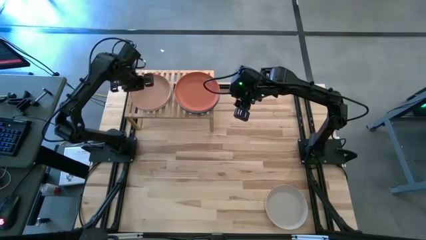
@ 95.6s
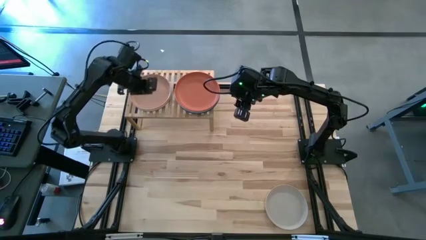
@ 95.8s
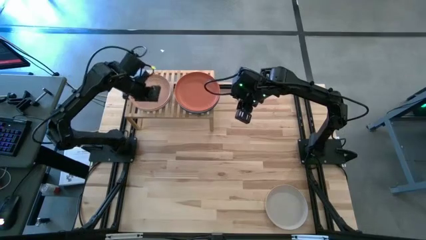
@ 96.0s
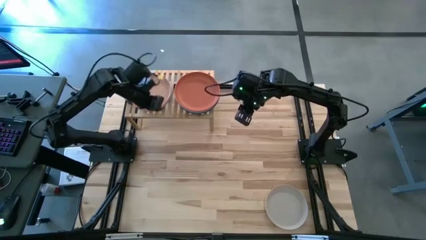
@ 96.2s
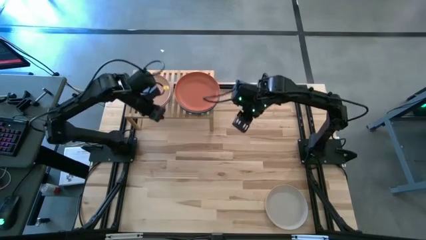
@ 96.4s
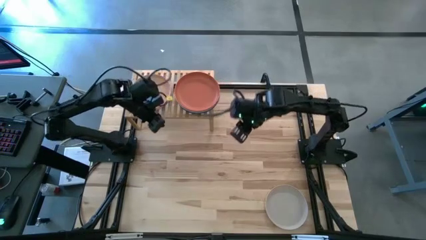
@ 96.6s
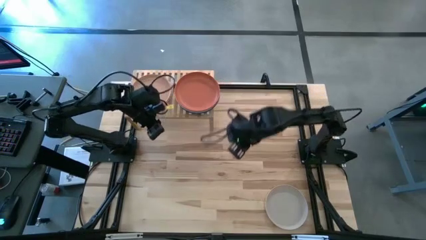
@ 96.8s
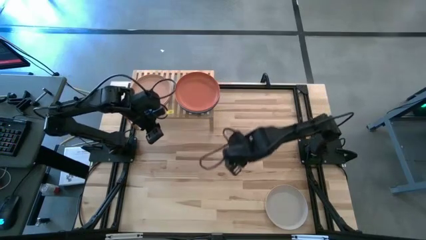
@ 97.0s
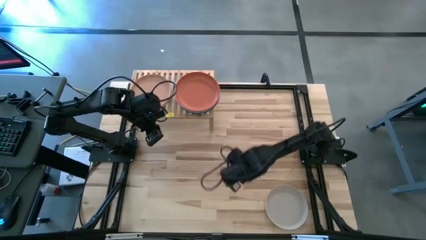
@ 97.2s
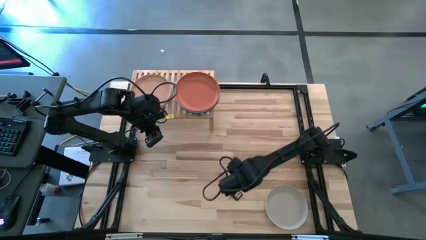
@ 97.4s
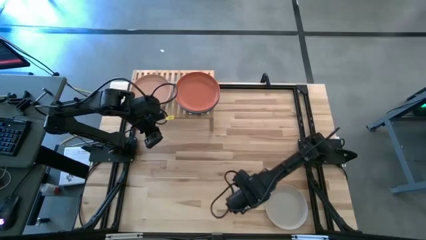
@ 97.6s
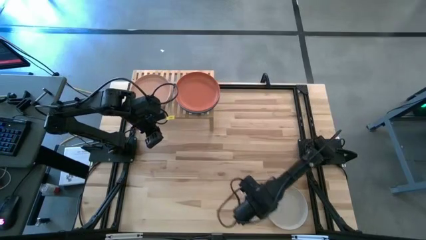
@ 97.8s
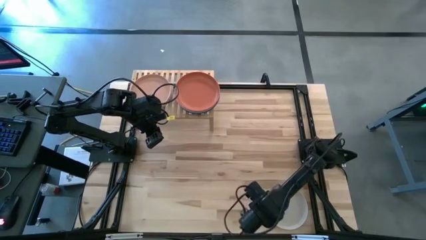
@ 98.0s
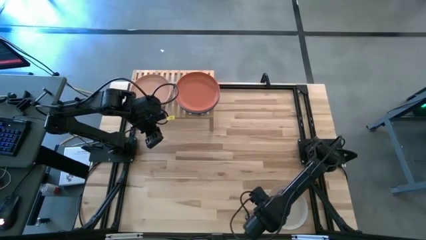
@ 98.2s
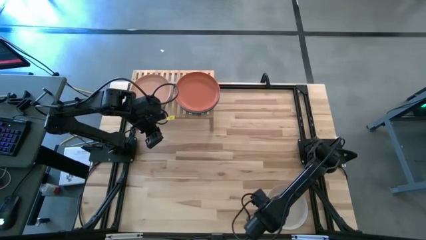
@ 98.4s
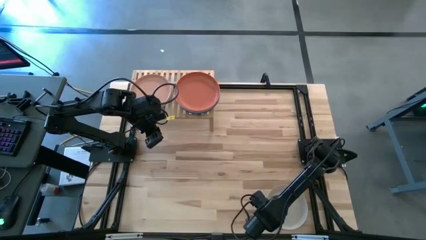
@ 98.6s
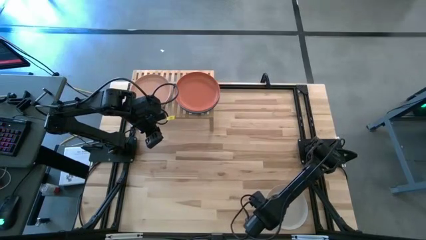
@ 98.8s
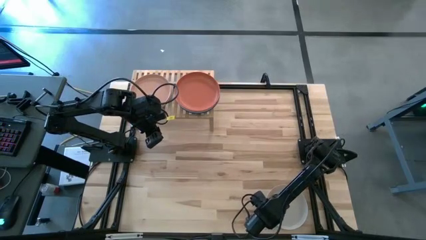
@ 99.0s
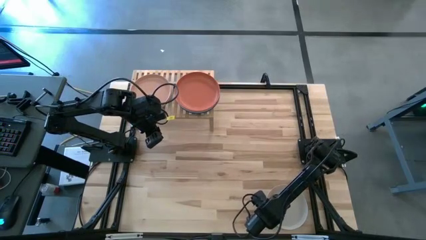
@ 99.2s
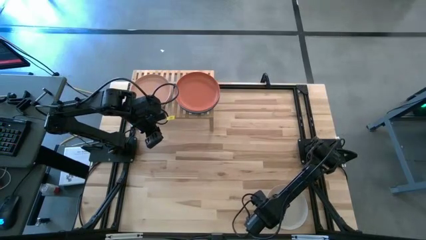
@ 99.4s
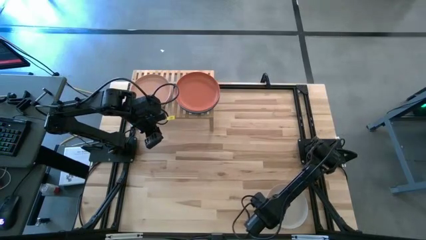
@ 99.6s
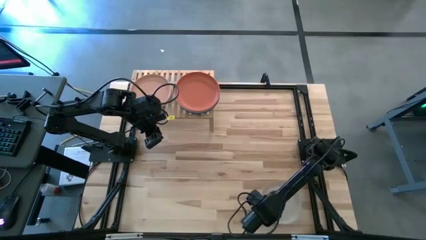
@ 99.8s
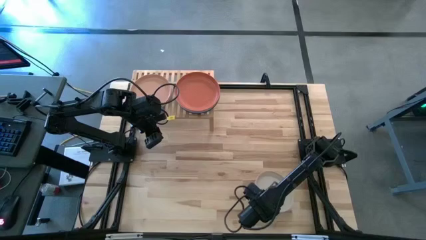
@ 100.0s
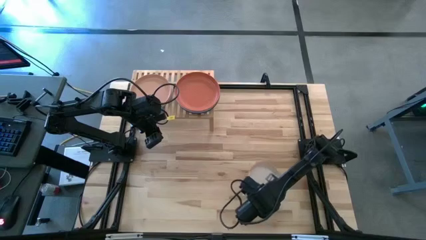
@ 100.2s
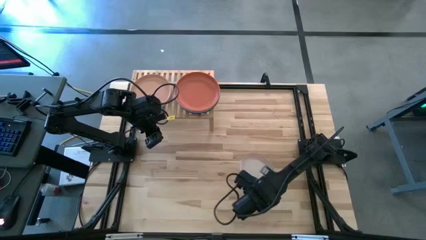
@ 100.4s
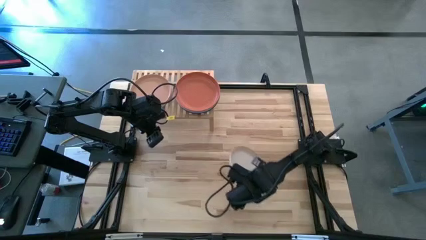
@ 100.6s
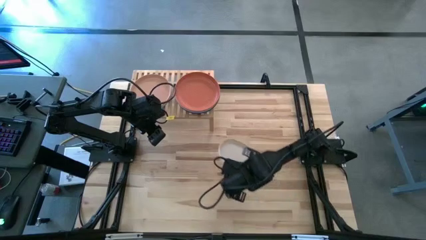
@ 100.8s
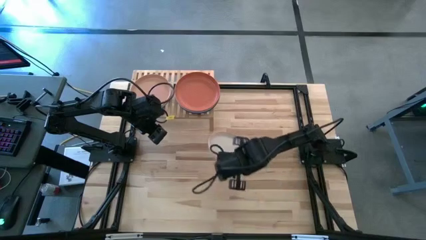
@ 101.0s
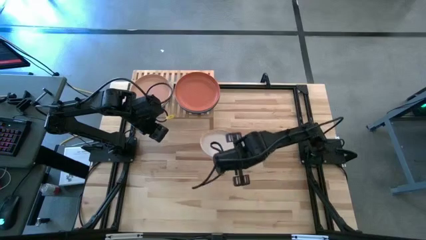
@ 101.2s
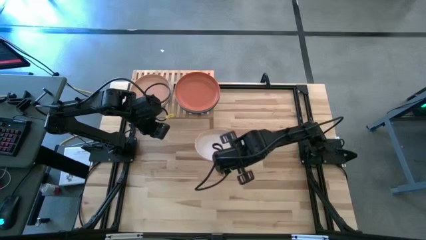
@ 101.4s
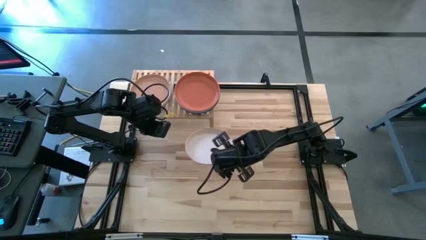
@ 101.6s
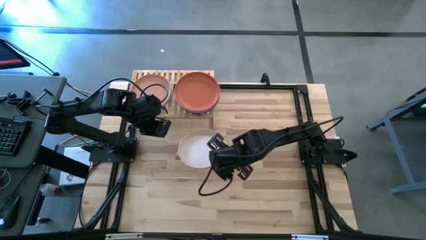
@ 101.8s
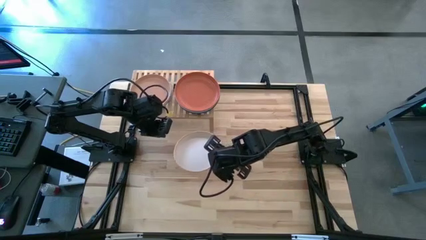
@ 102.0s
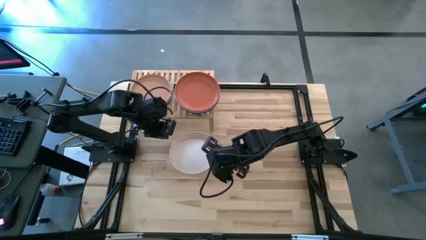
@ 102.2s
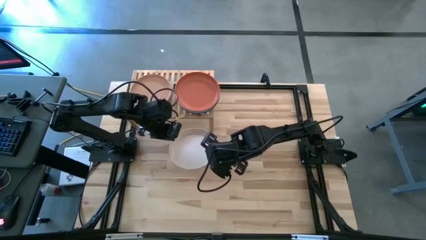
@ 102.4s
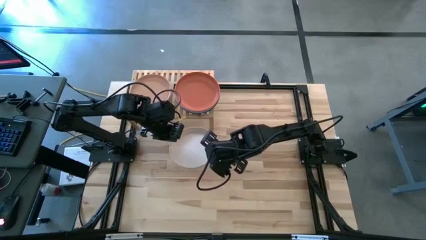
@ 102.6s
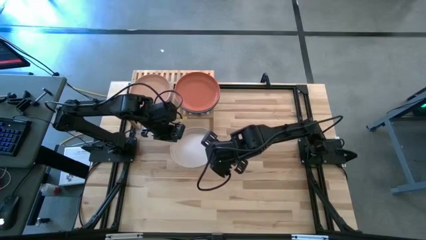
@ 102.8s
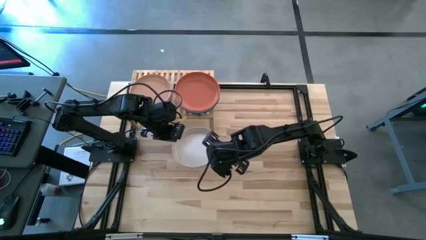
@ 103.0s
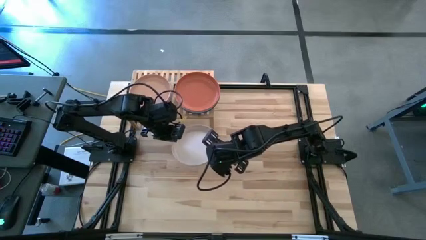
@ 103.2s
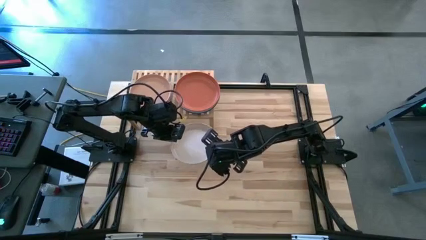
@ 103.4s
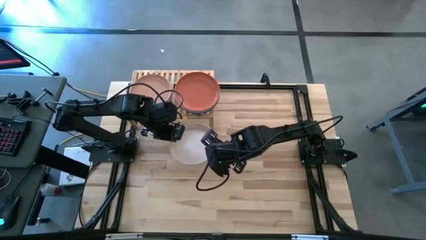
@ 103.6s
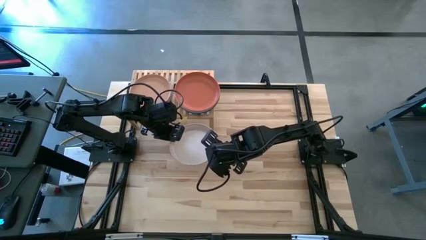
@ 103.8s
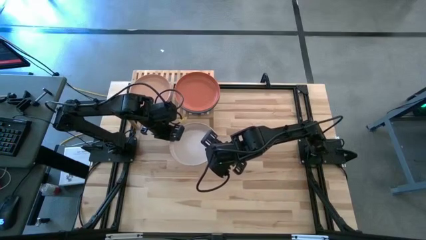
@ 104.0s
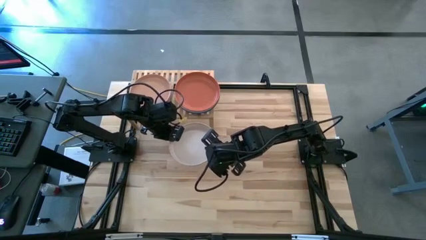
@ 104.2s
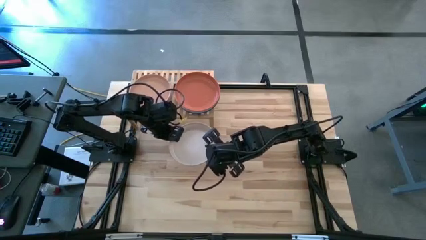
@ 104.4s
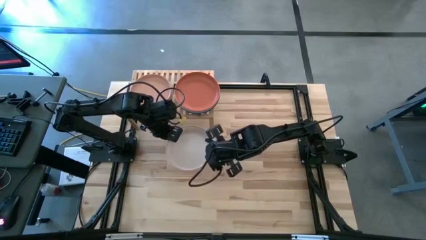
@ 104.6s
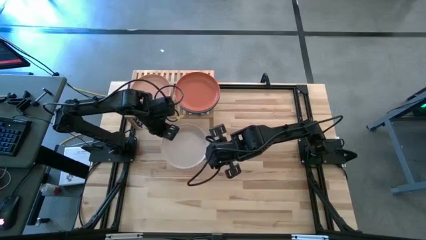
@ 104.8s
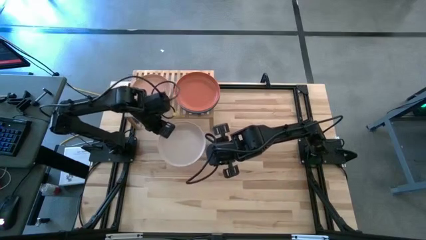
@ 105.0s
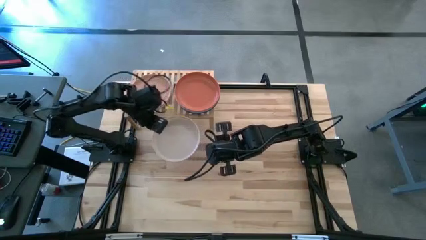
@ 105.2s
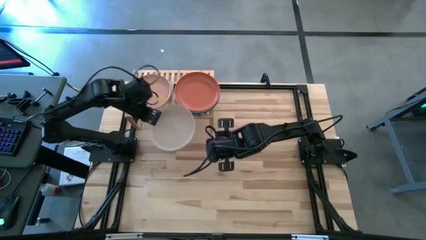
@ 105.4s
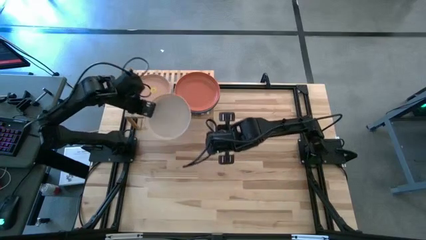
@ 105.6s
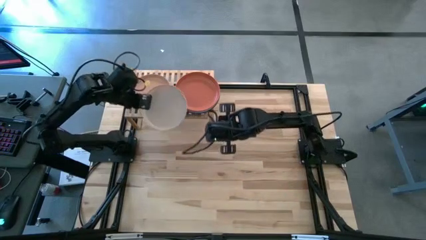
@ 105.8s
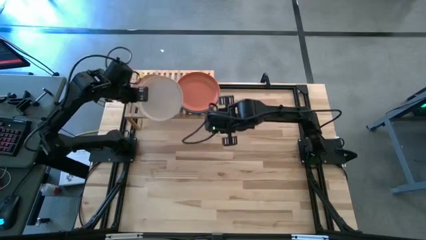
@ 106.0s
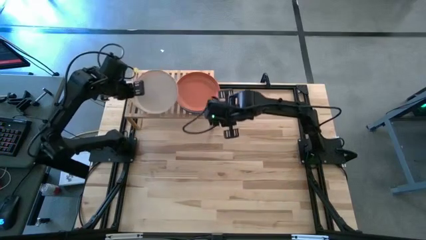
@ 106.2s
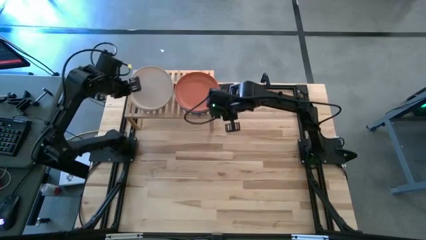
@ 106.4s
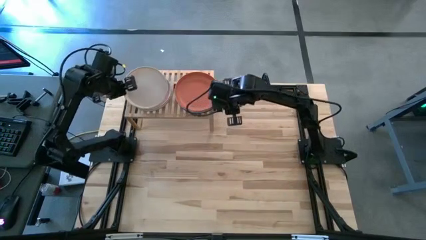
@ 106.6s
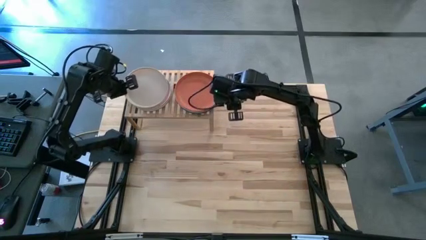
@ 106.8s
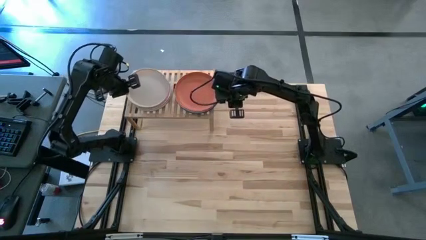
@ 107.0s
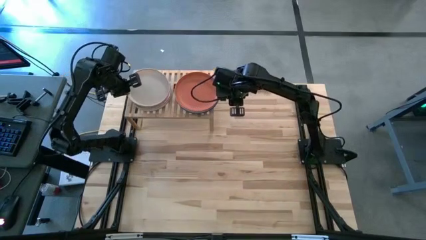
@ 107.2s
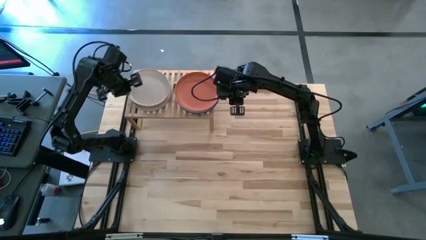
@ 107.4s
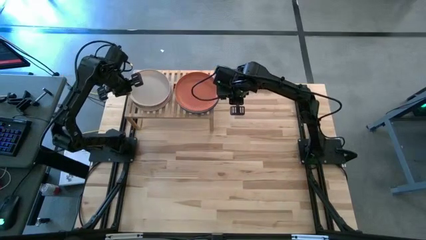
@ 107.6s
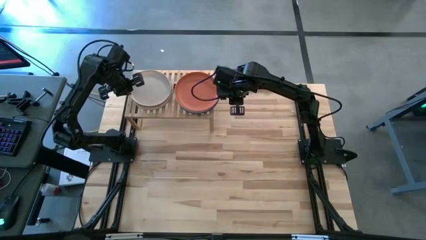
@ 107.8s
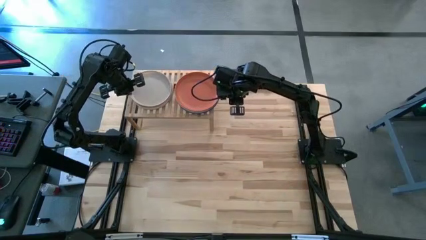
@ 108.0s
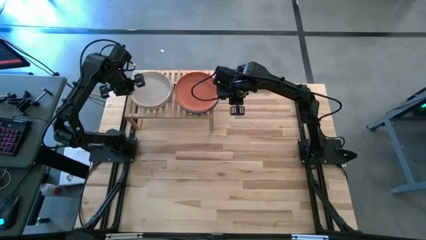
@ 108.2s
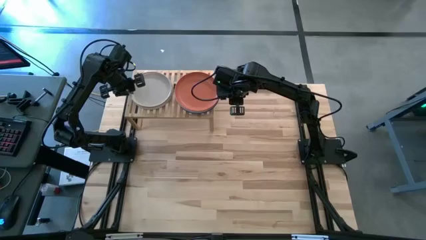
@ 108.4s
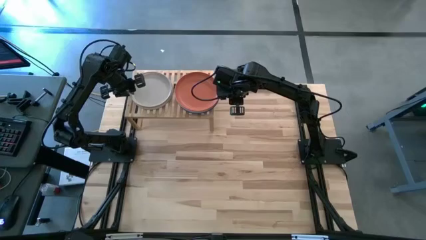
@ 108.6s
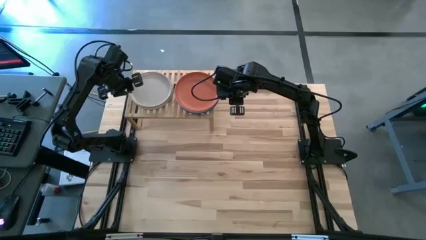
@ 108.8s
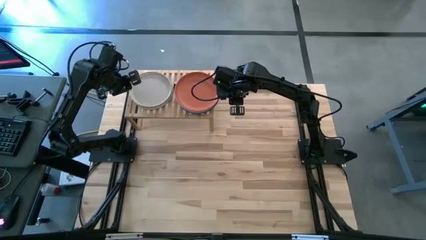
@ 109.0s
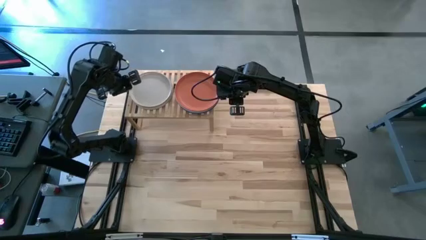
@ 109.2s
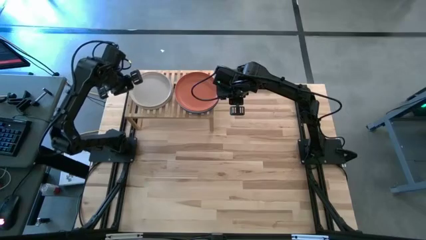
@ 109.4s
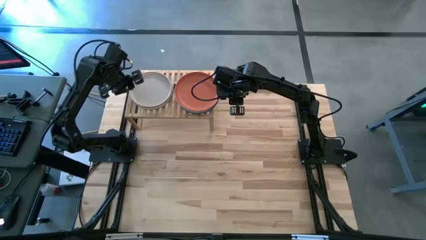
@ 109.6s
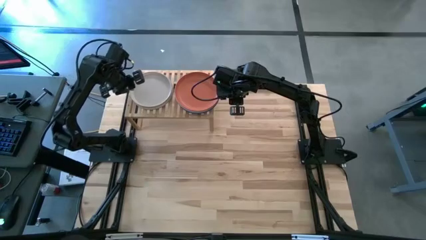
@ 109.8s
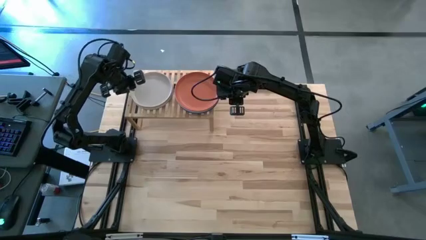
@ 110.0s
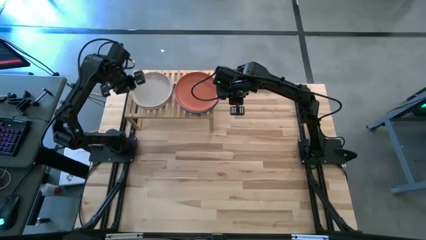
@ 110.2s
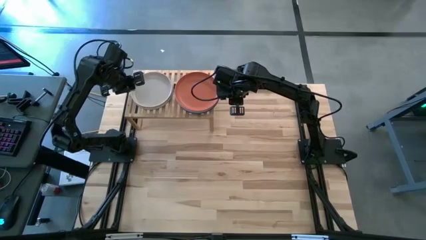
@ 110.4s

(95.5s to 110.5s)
Task: Place and stack plates onto a shelf
Stack the gray plate on top of the brown plate on the shelf
